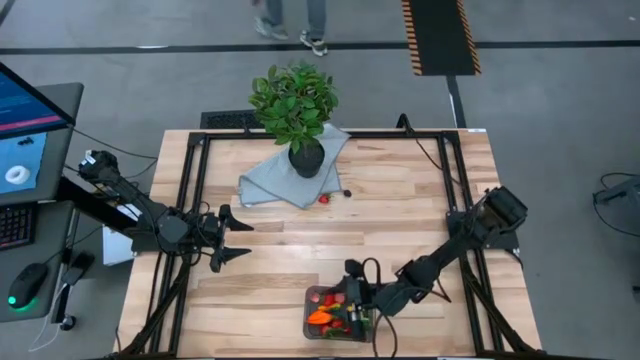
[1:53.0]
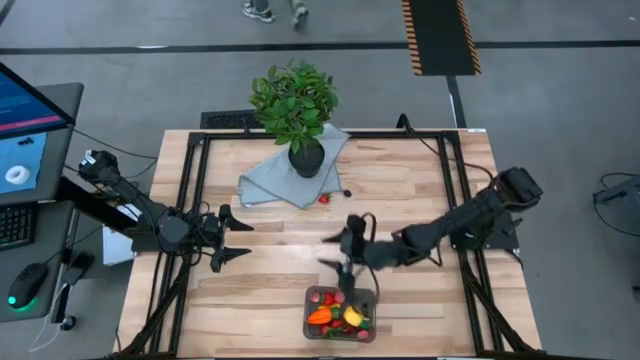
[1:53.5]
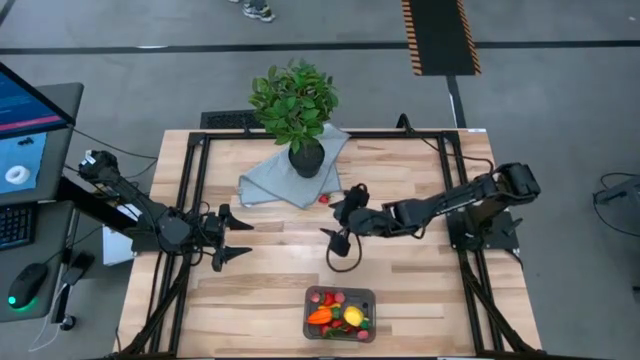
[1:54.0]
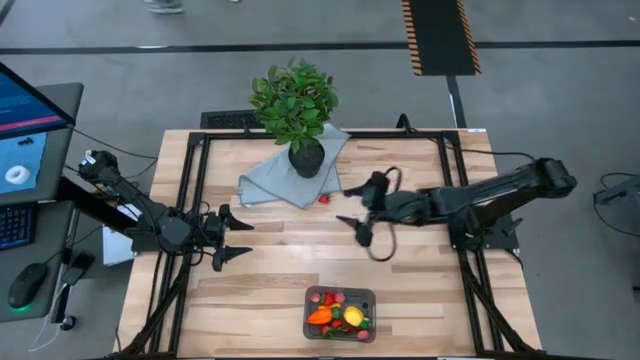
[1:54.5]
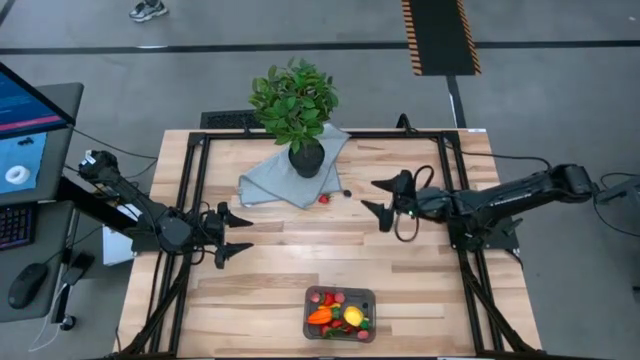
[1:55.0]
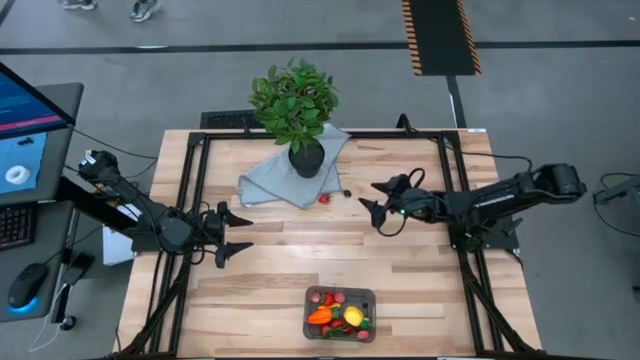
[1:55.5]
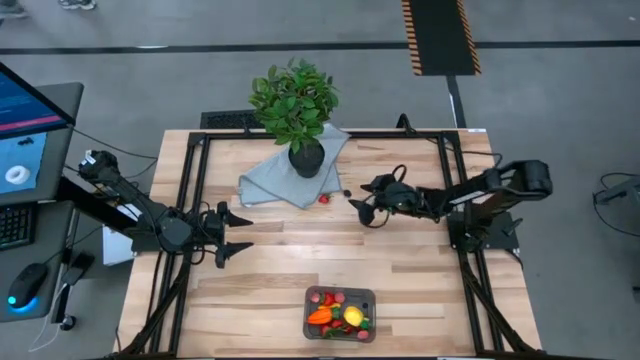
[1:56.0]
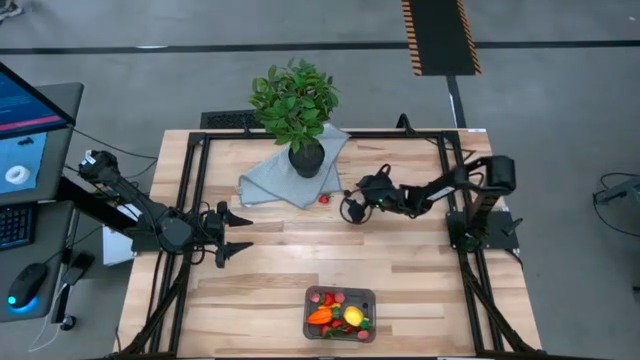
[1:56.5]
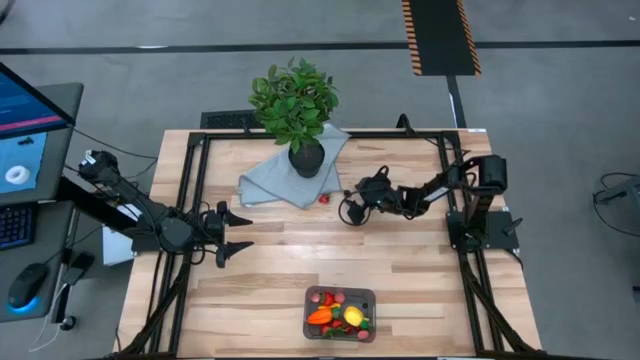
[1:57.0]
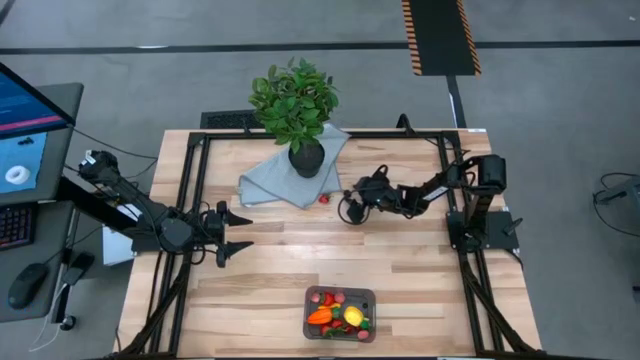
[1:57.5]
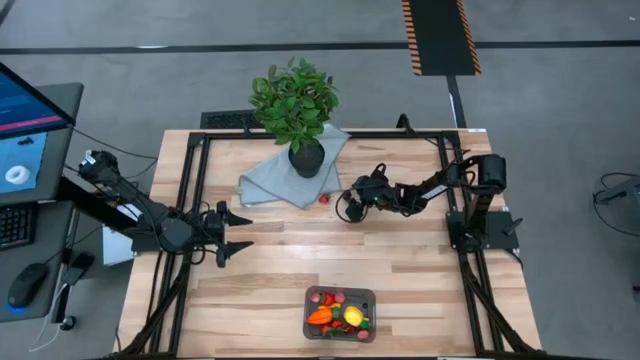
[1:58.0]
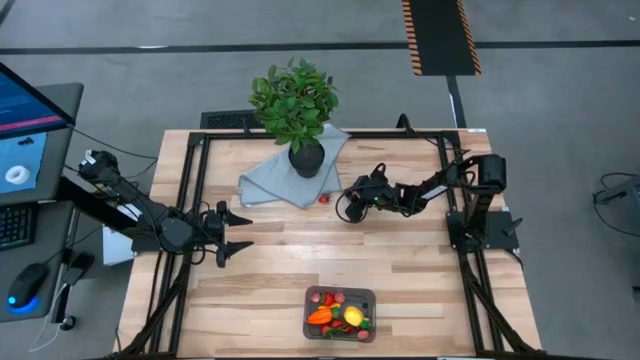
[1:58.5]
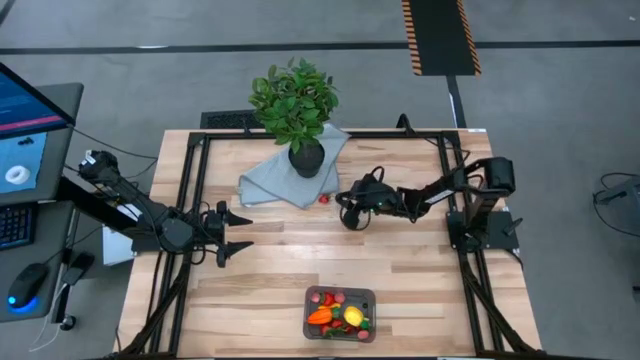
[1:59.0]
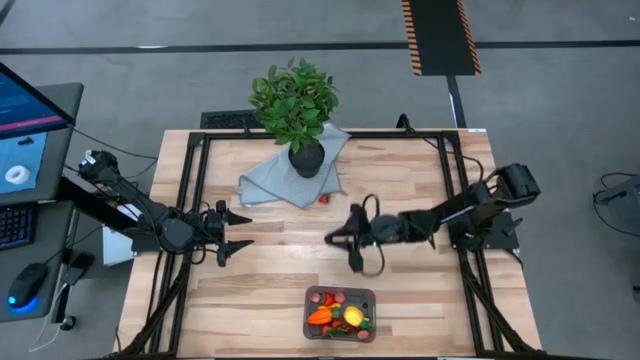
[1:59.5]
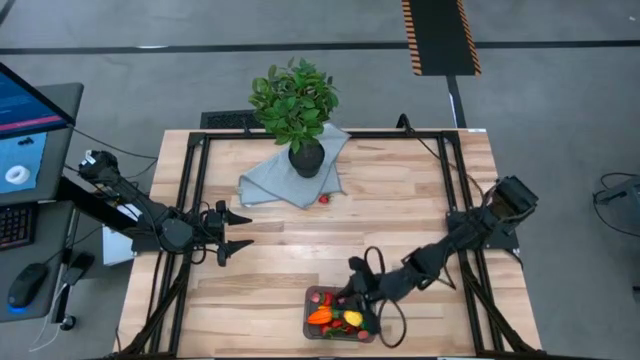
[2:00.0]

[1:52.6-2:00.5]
Task: Pick and placing Produce into tupperware
Put the blackberry into the black bin

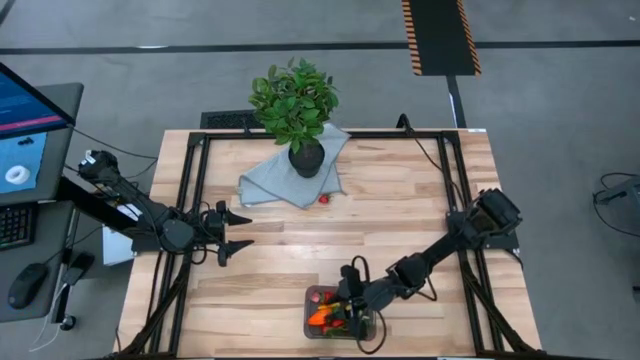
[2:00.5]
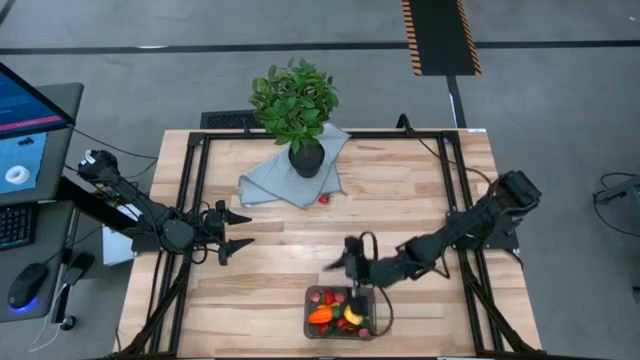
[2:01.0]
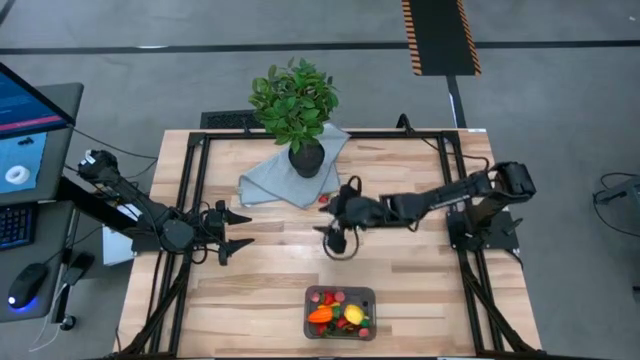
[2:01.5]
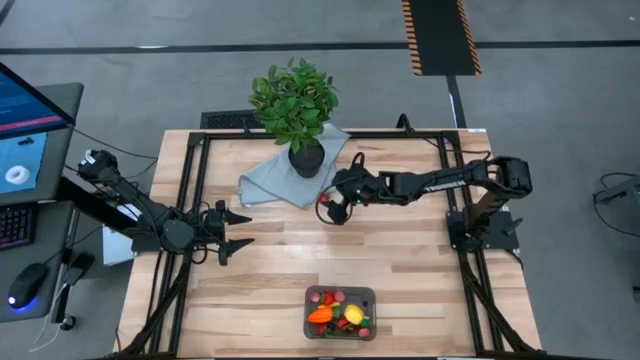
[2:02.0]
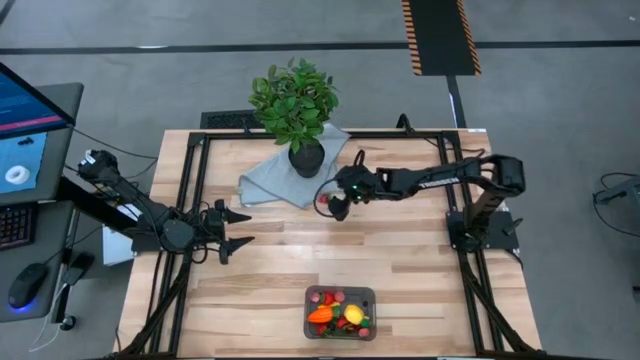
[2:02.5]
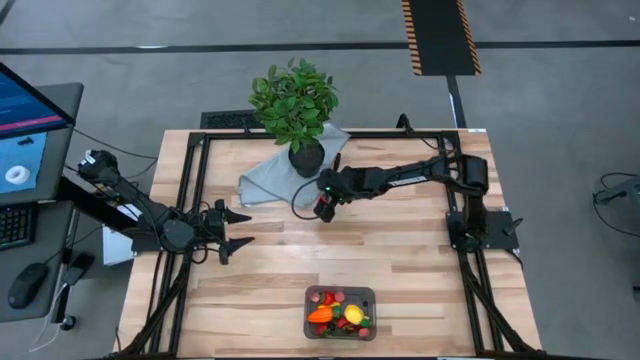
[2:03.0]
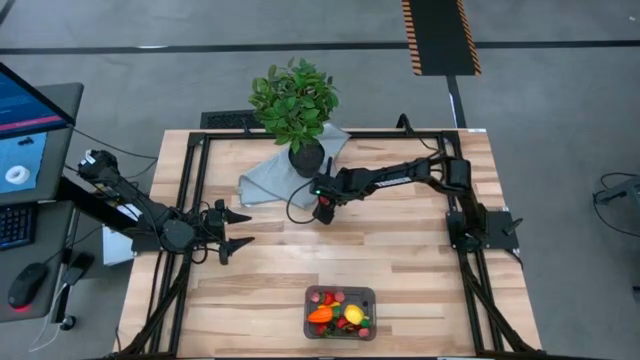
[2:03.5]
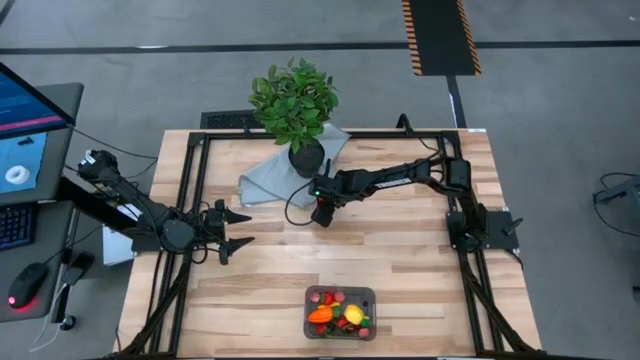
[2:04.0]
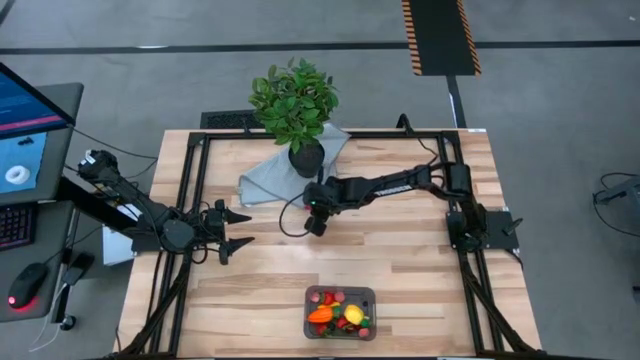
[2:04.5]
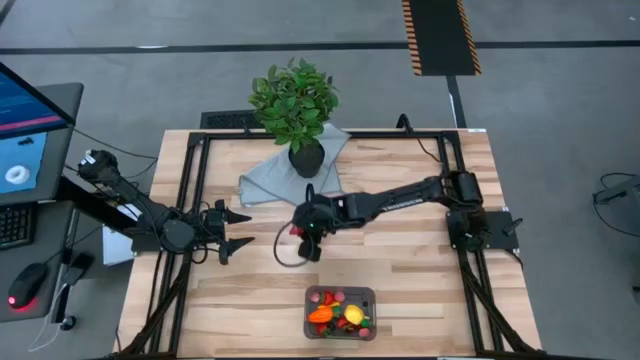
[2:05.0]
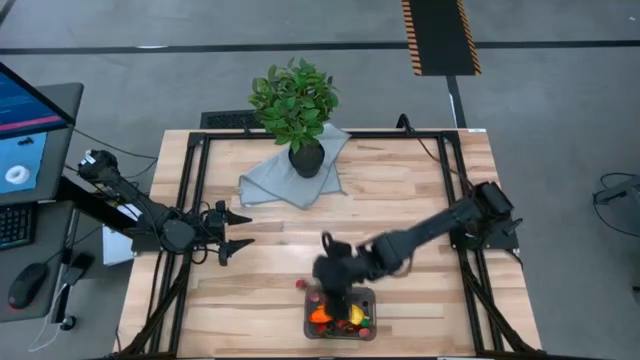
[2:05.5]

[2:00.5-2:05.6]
Put the red strawberry into the black bin

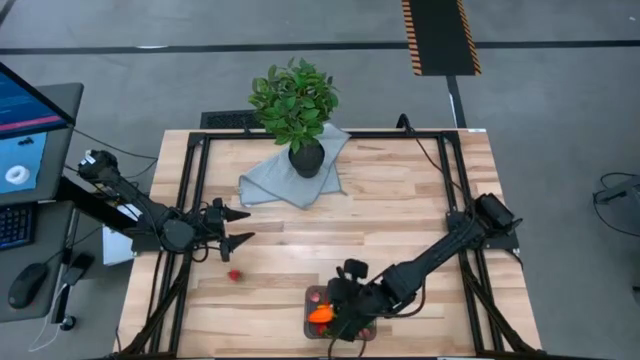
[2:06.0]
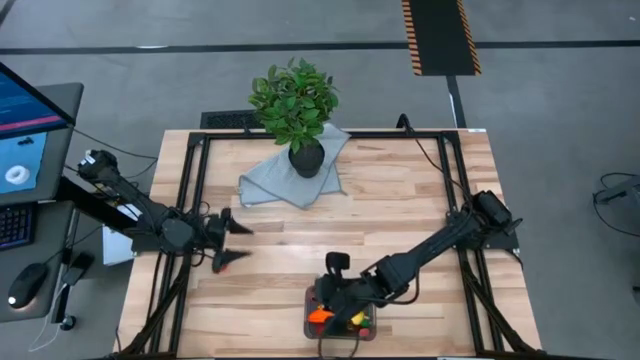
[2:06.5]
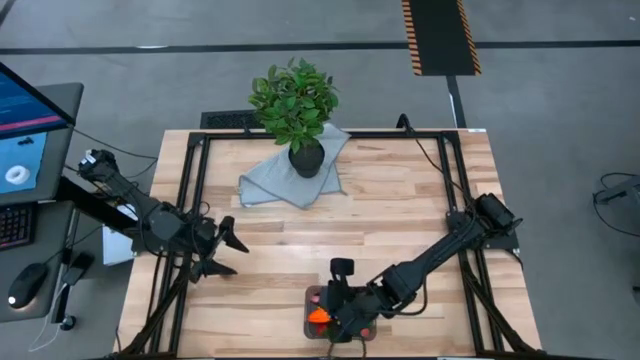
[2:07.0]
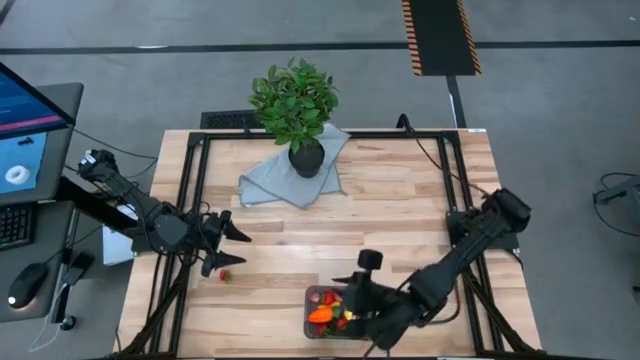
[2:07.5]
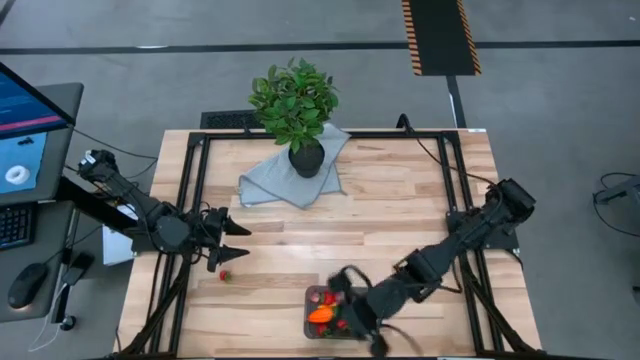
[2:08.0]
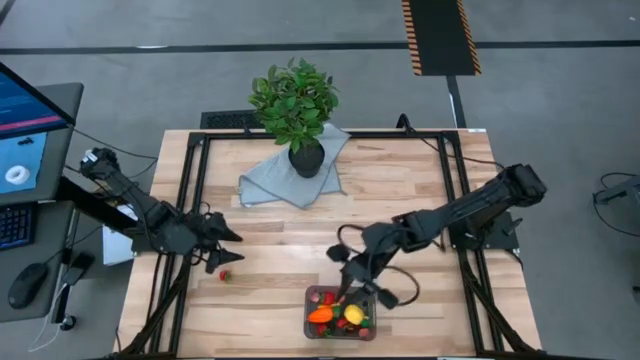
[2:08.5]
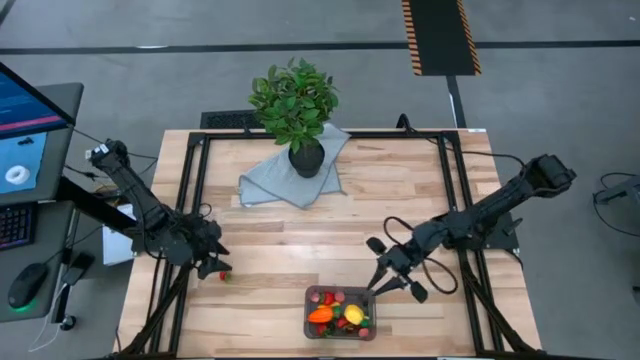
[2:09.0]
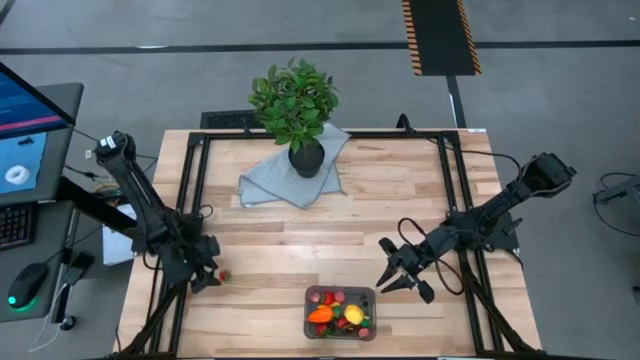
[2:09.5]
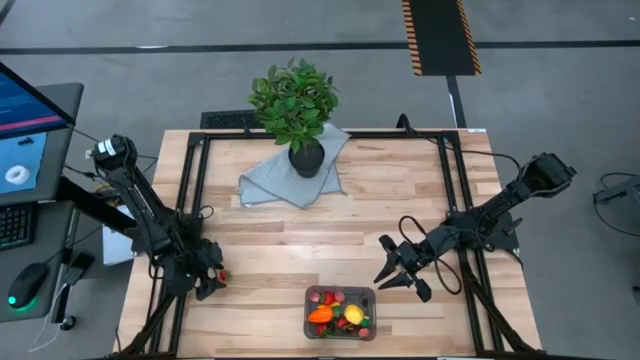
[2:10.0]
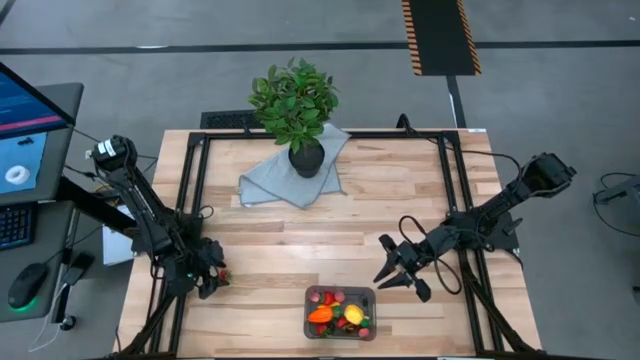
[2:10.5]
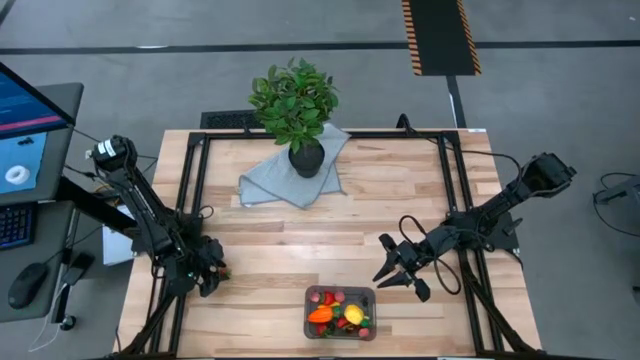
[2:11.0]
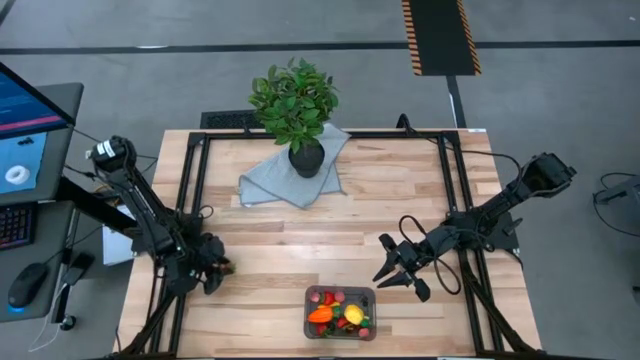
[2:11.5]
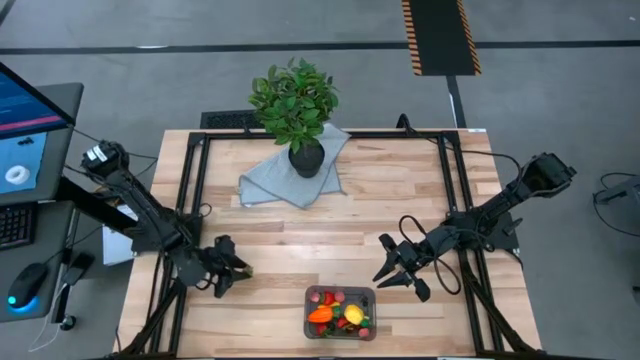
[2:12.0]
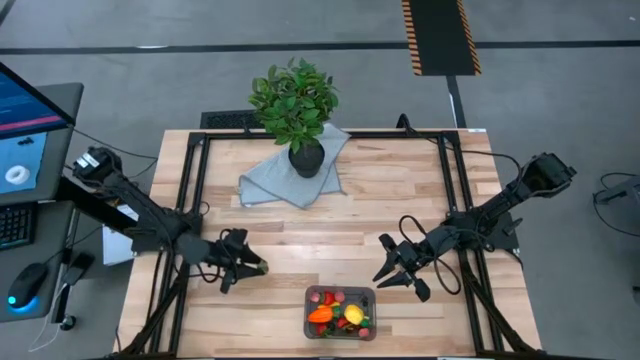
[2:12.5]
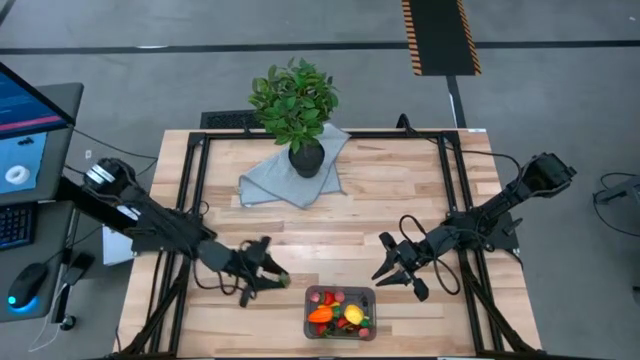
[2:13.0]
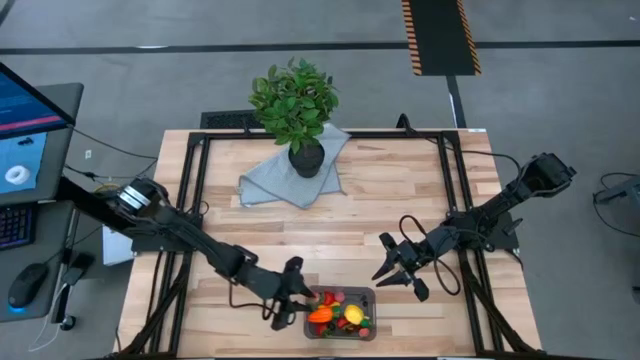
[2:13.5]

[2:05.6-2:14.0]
Put the red strawberry into the black bin
